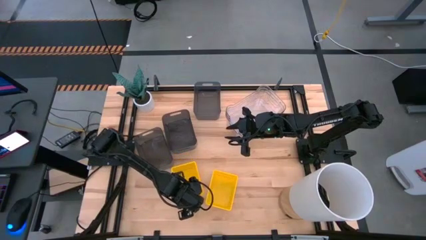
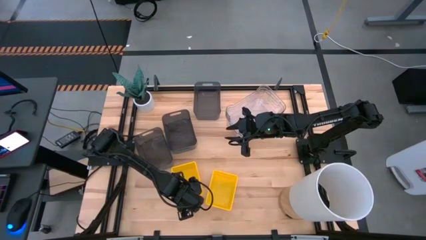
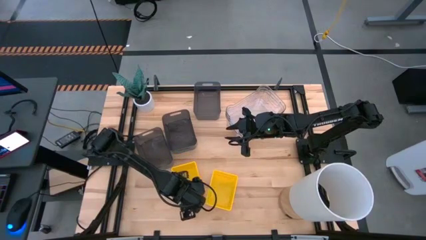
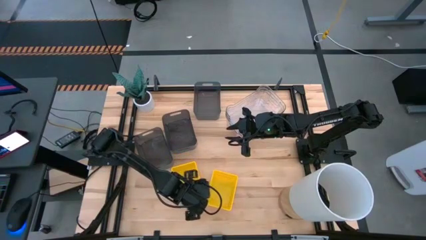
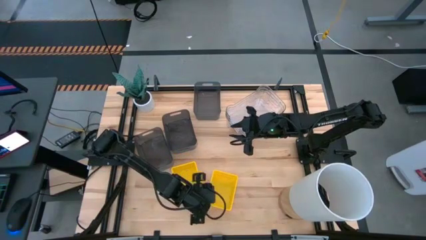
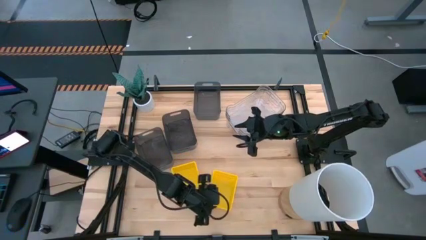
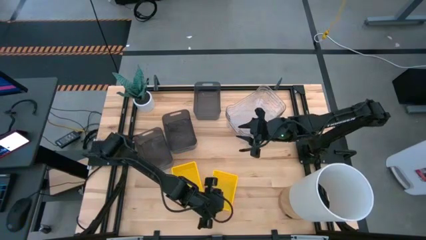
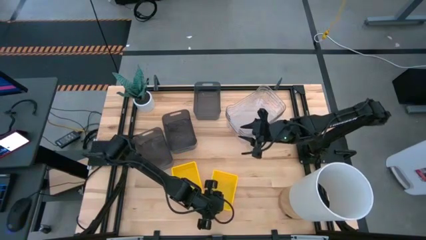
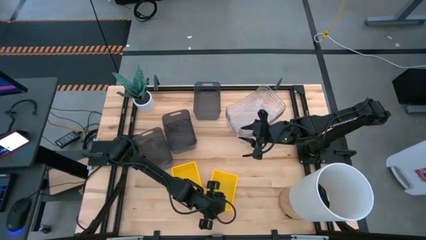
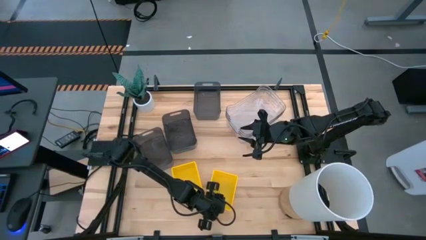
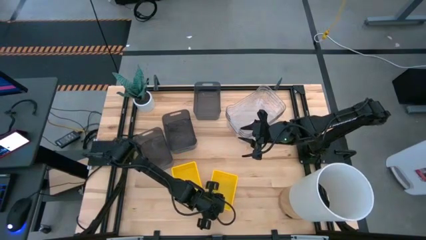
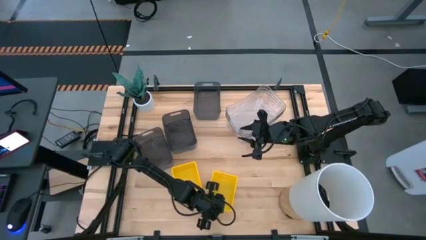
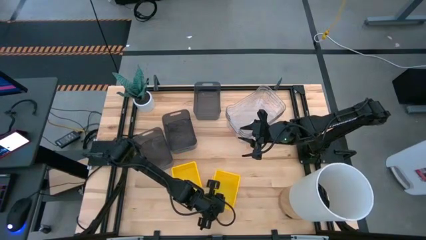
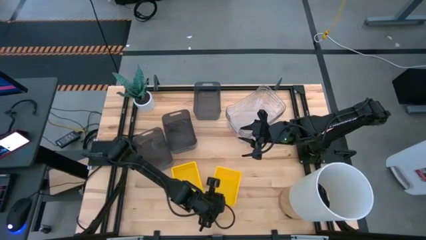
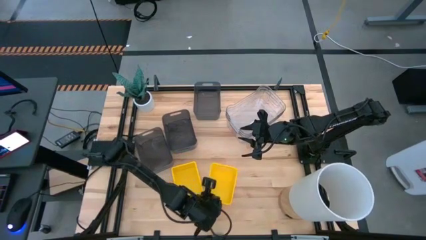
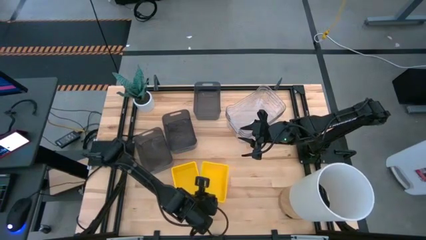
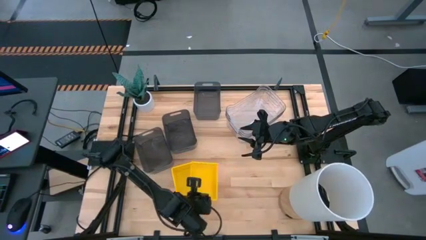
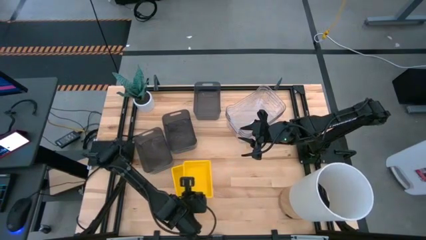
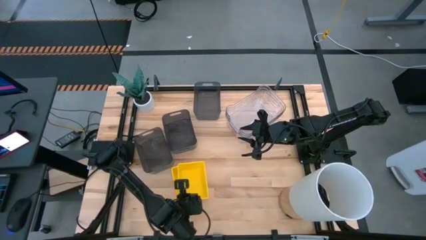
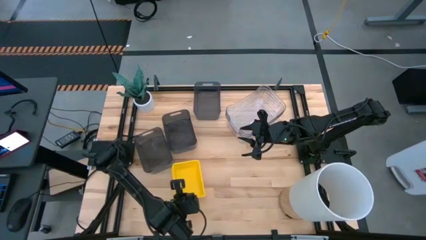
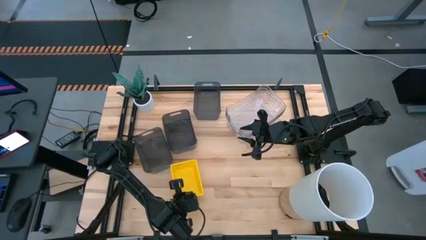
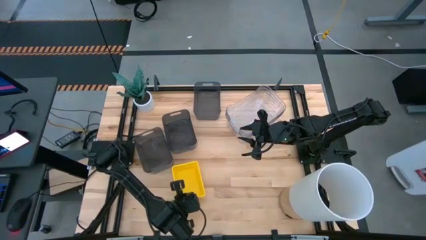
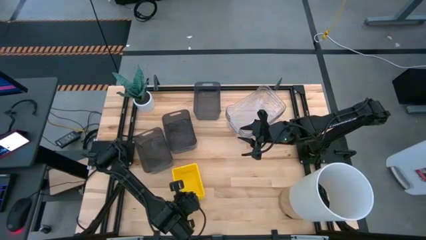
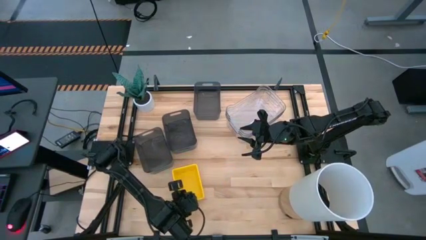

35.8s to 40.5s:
Stack the right yellow bin on top of the left yellow bins

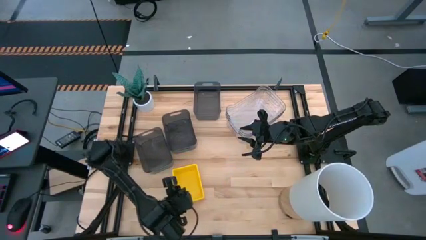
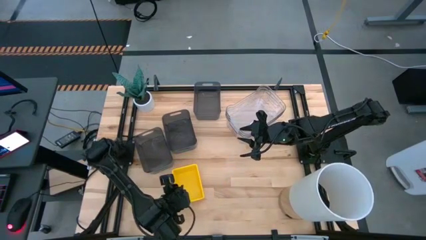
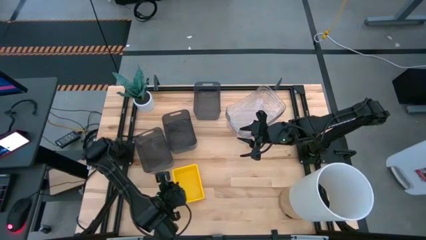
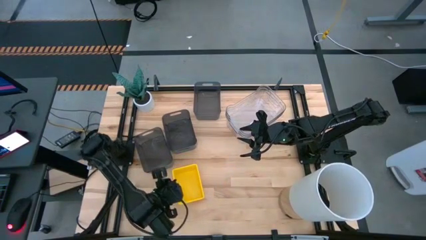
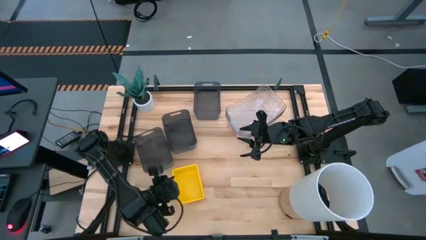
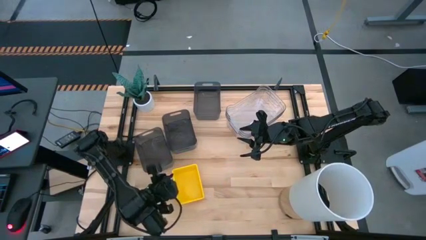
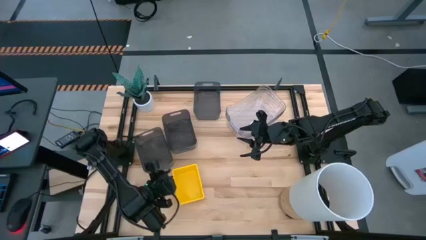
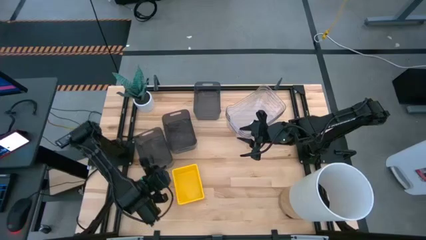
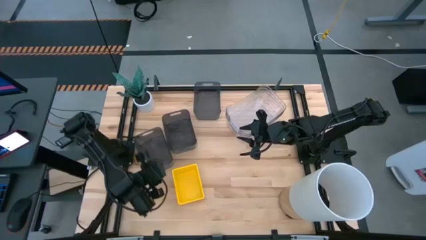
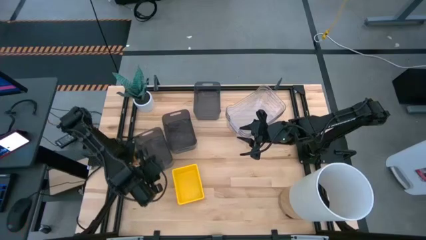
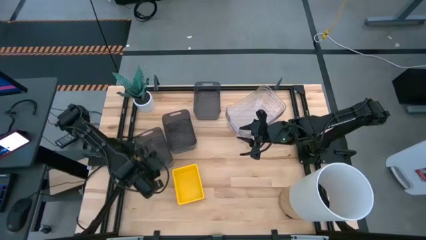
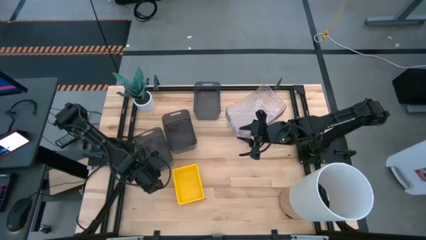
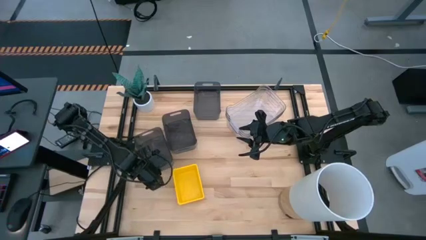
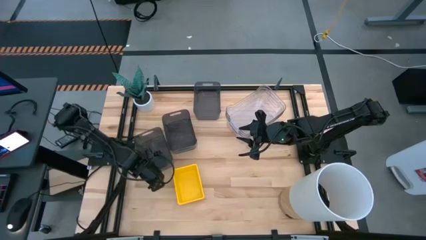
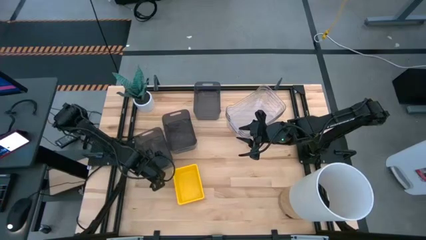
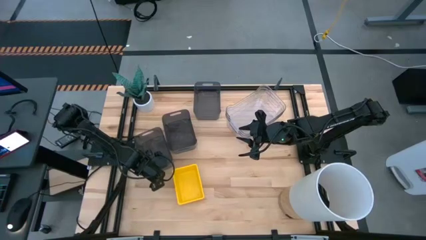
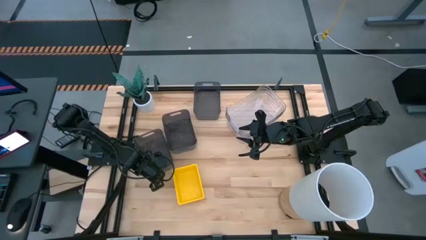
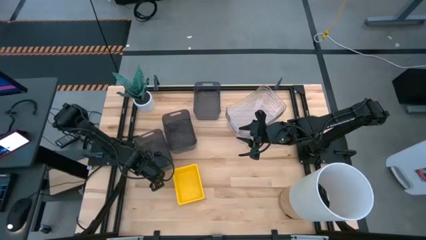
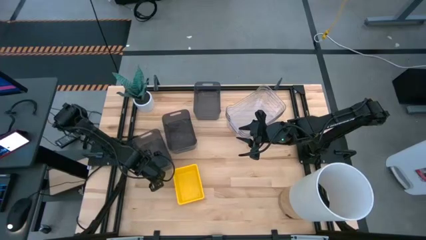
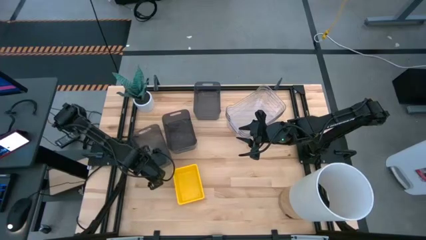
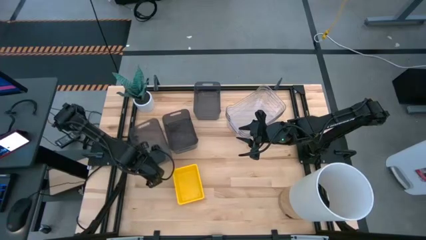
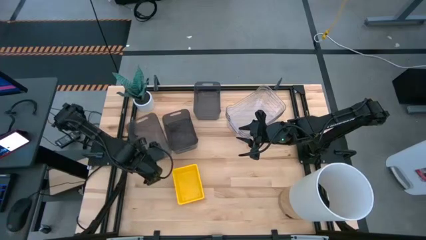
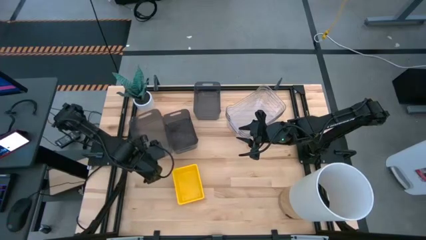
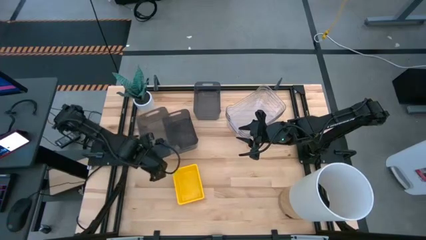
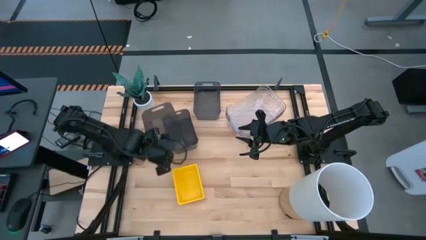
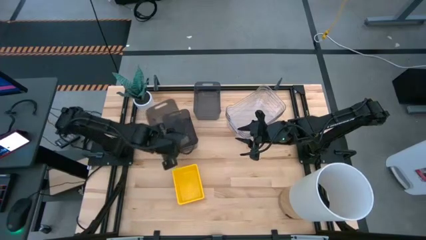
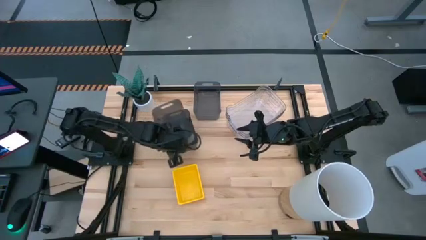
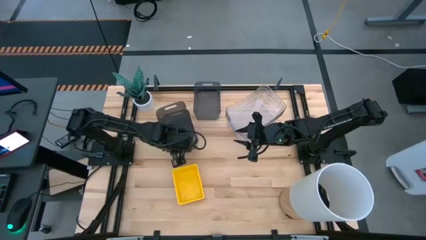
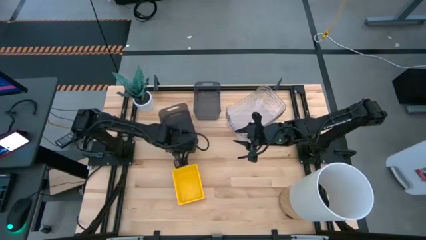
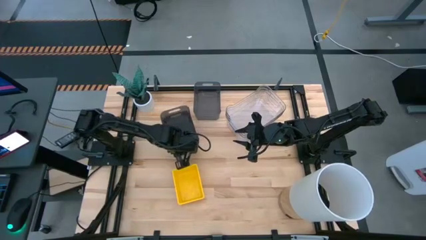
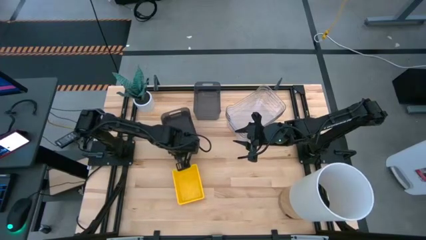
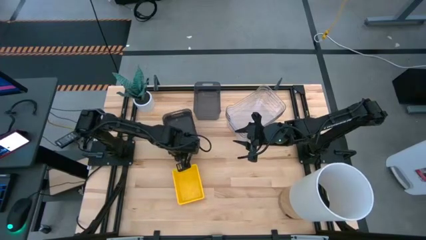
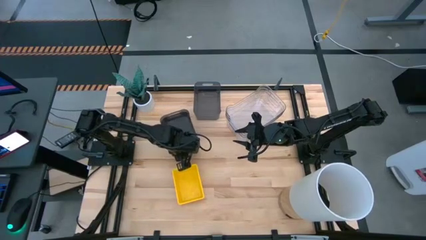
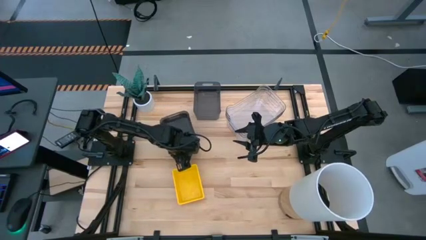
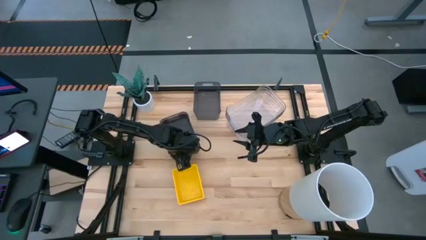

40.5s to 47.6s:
Stack the bottom black bin on top of the middle black bin
